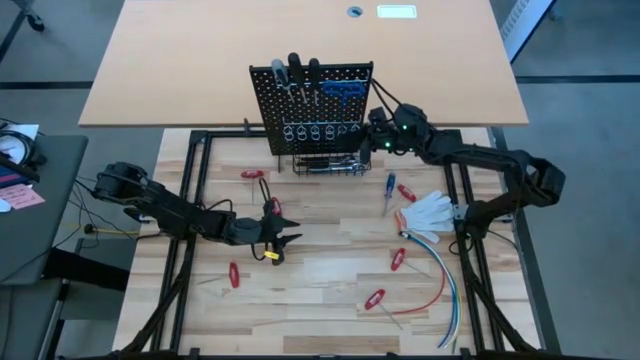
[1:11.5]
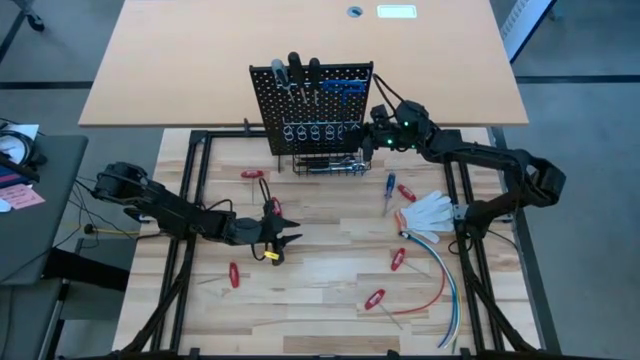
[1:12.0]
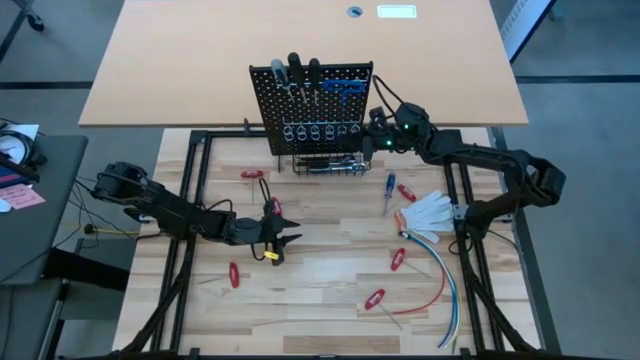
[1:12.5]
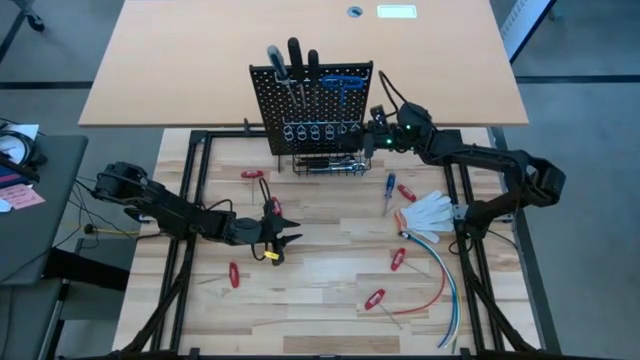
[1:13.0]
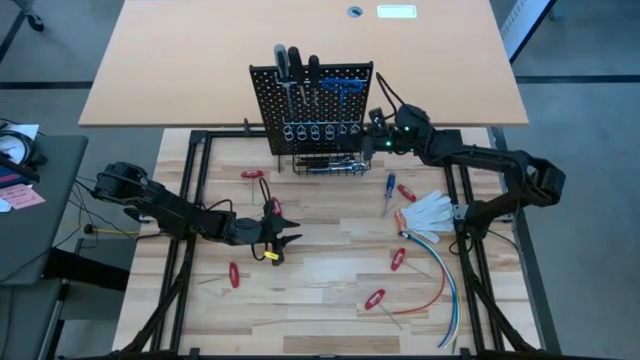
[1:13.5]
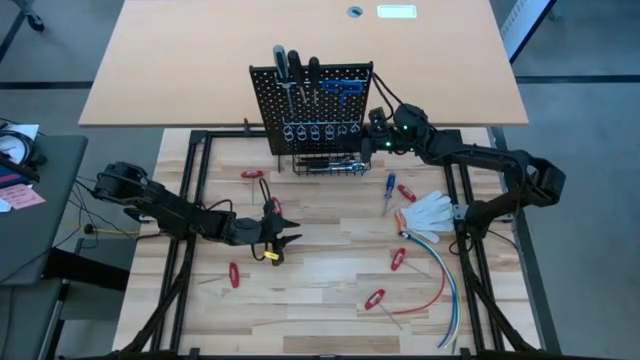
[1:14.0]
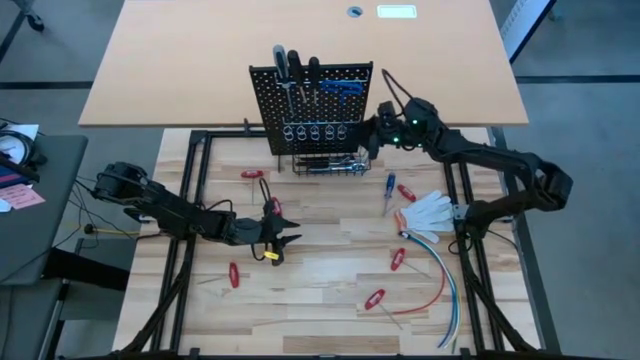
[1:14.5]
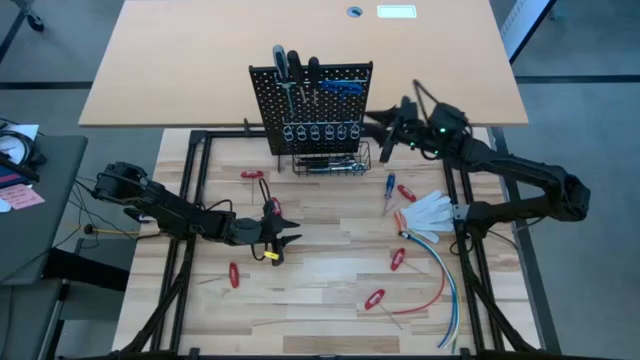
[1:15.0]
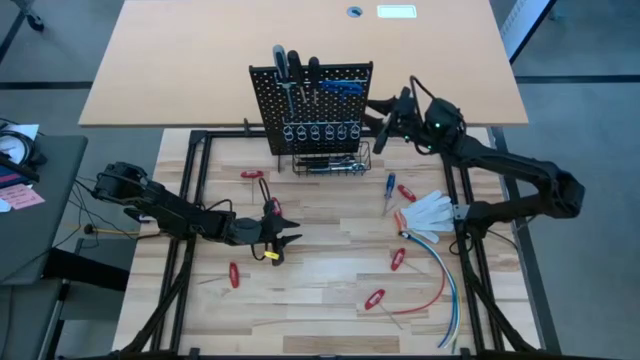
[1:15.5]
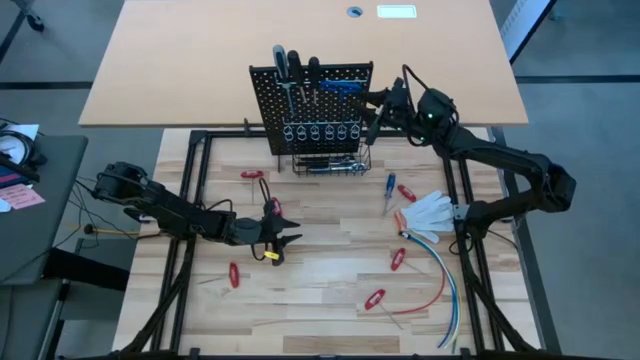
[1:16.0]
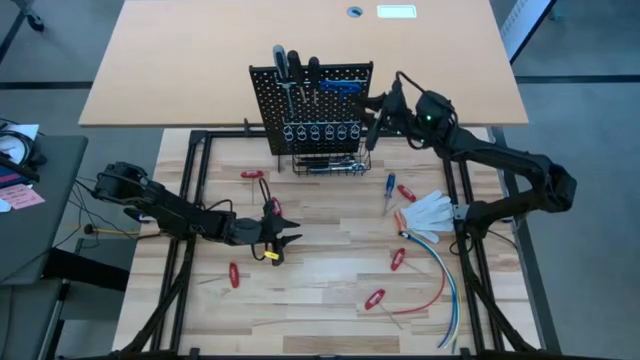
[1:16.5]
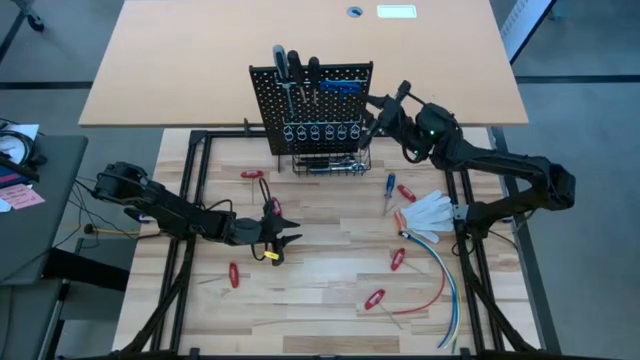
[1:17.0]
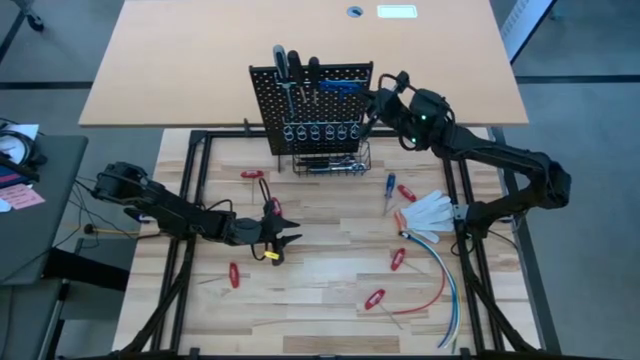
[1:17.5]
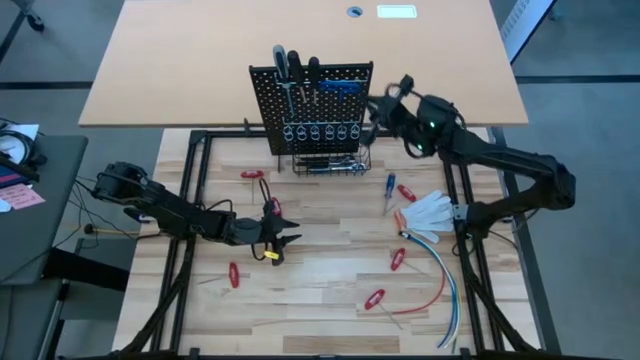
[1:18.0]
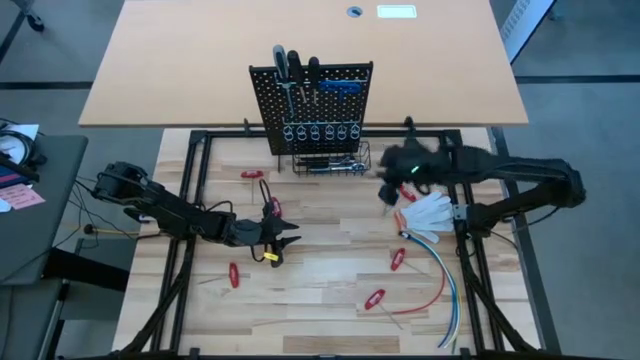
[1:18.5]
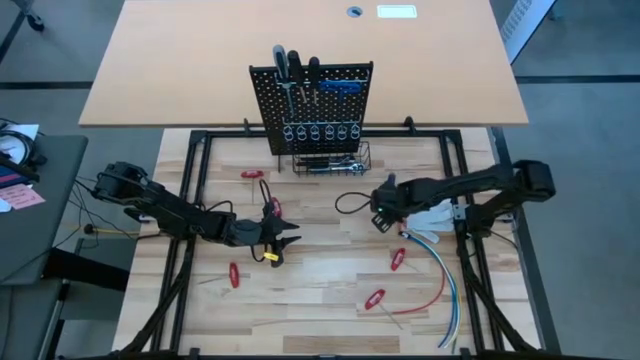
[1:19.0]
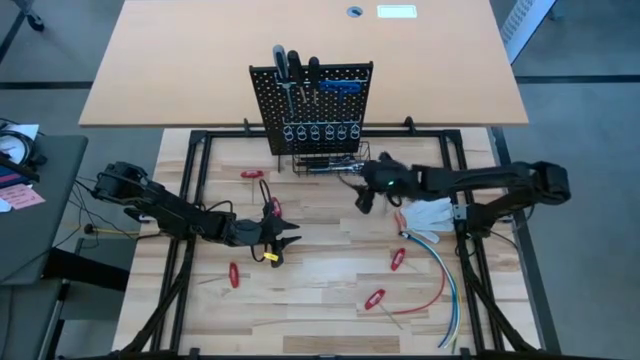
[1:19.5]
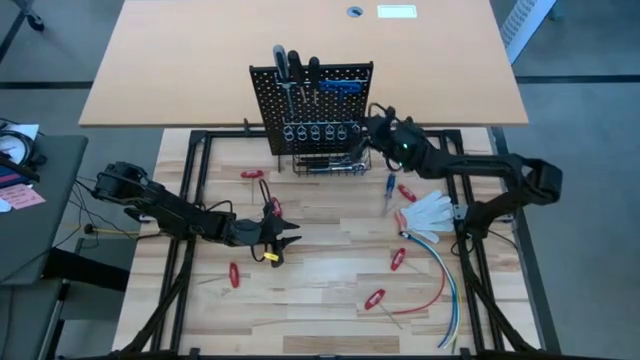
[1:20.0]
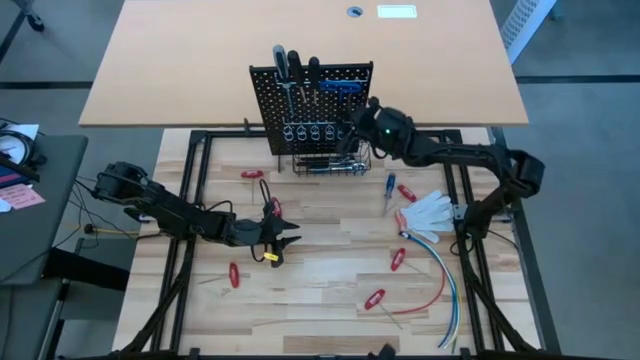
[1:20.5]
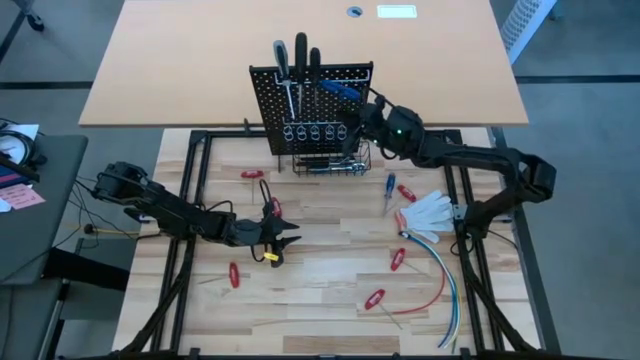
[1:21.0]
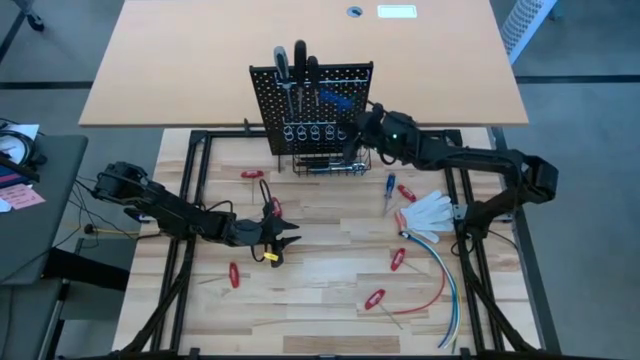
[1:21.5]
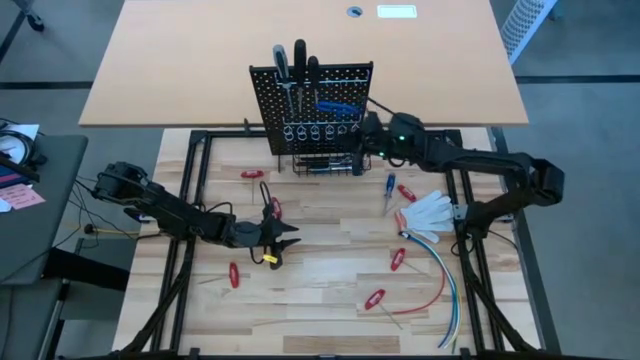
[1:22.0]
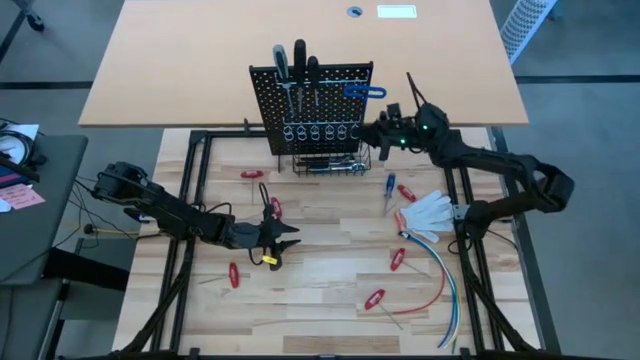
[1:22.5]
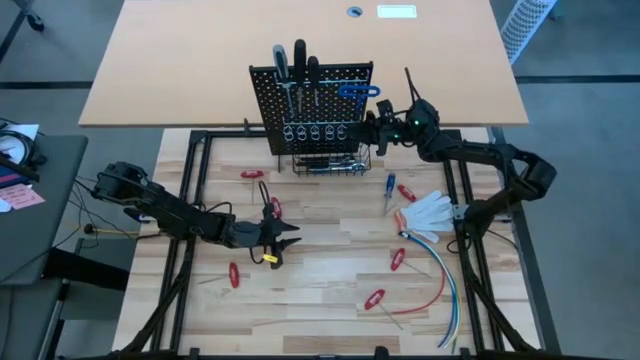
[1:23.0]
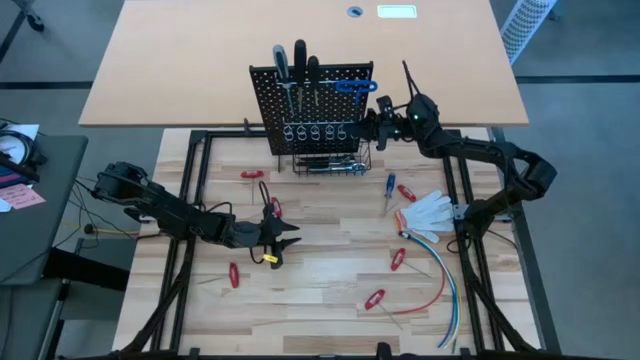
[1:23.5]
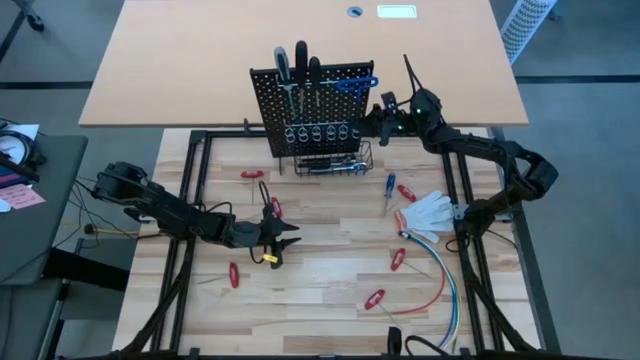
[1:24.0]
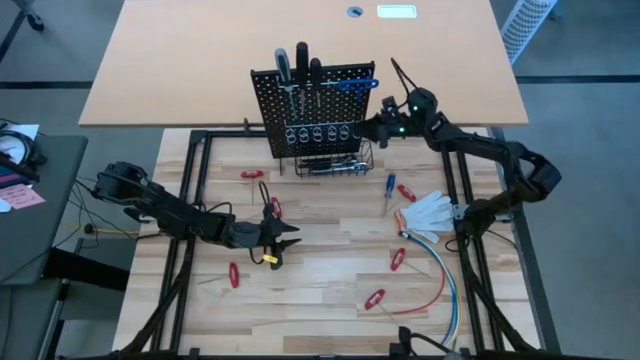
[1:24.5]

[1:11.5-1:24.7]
Task: Hang tools onto peg board
Hang the blue pick tool on the pegboard

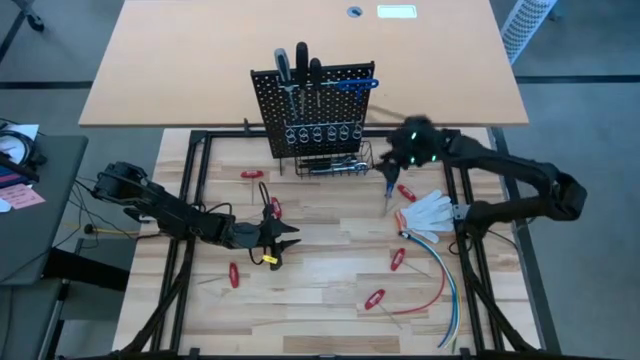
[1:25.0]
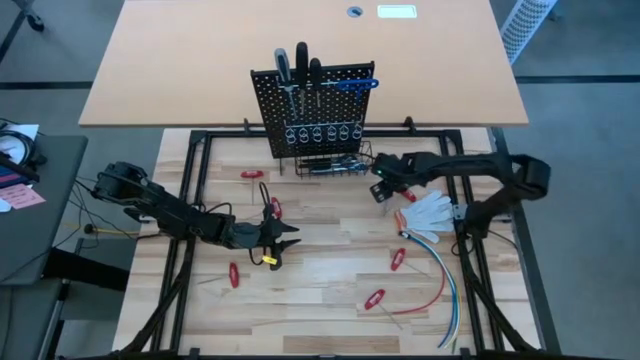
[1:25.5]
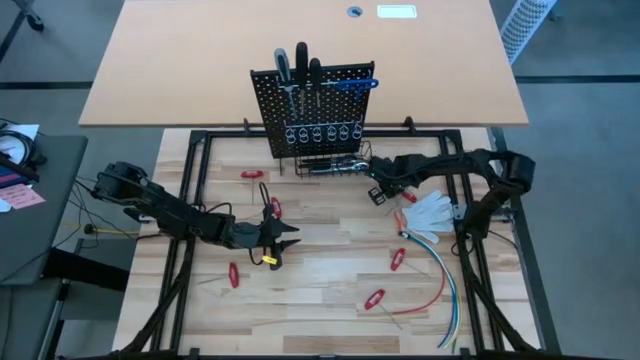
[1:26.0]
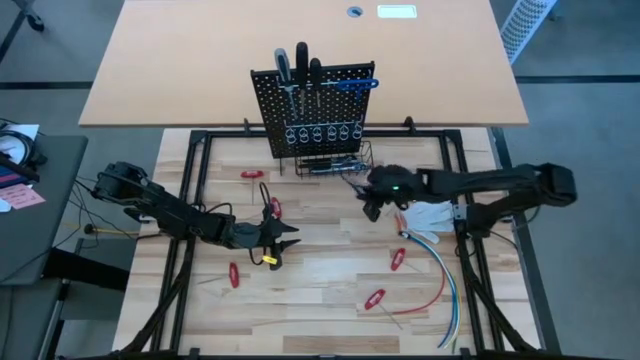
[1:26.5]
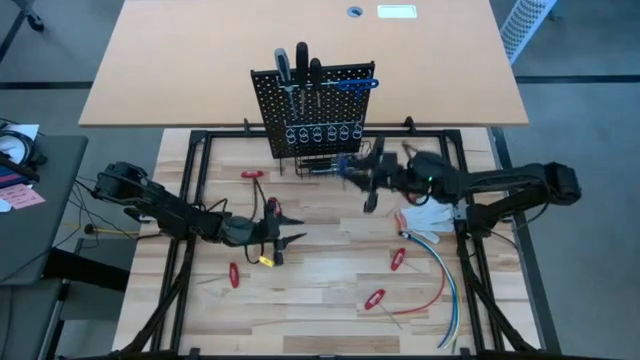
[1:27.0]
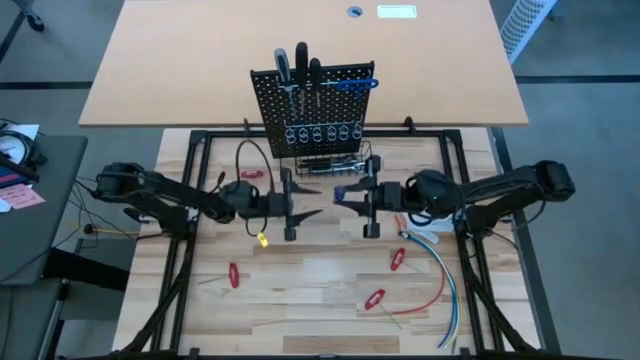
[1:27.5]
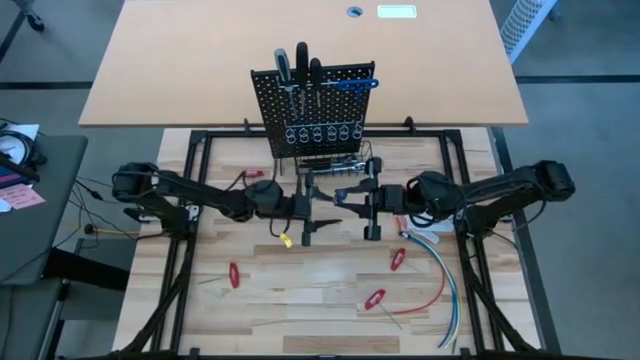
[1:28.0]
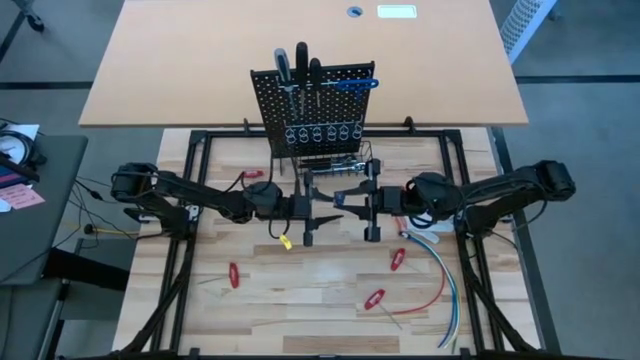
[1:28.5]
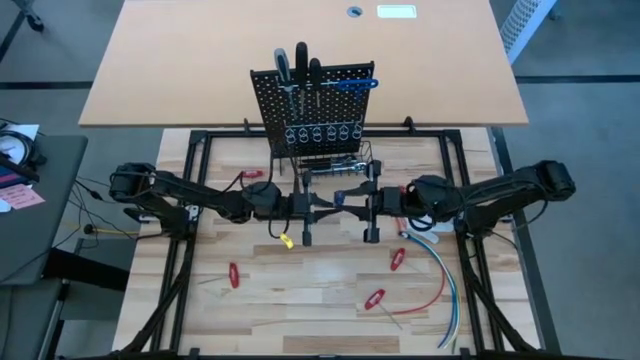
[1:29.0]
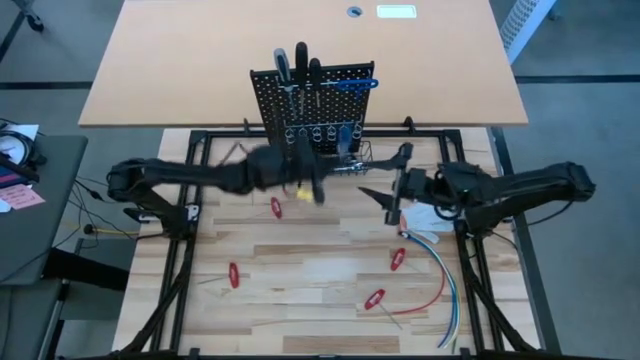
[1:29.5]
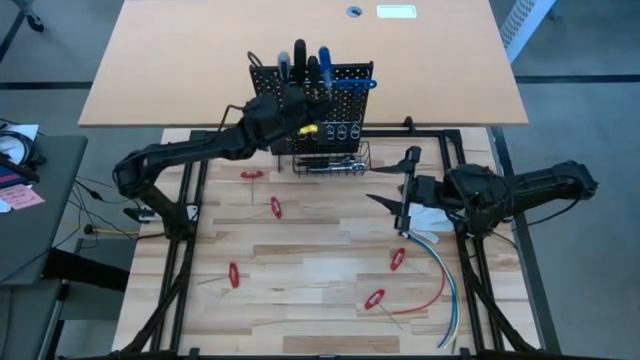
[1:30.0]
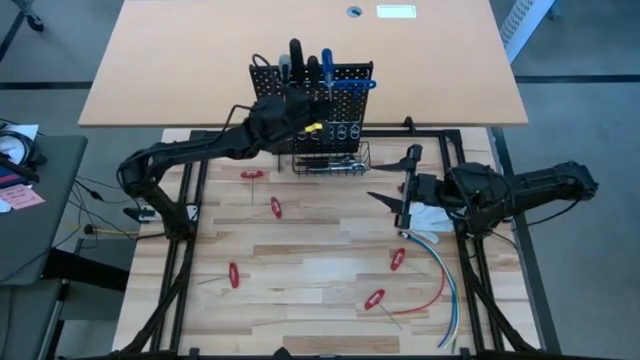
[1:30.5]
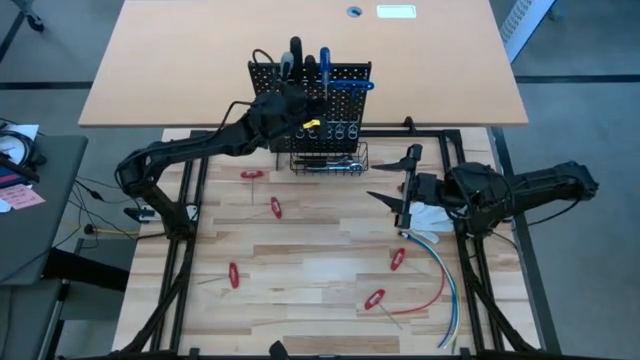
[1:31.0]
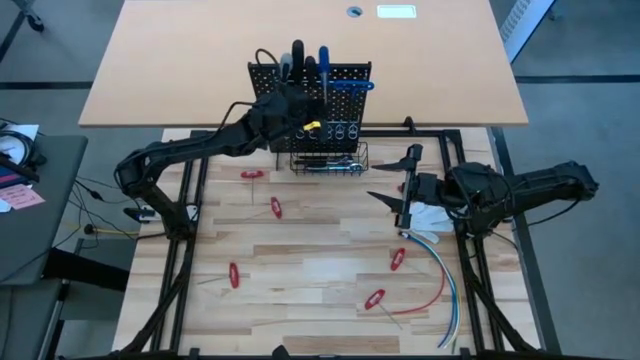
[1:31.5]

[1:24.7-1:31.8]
Hang the blue screwdriver on the pegboard

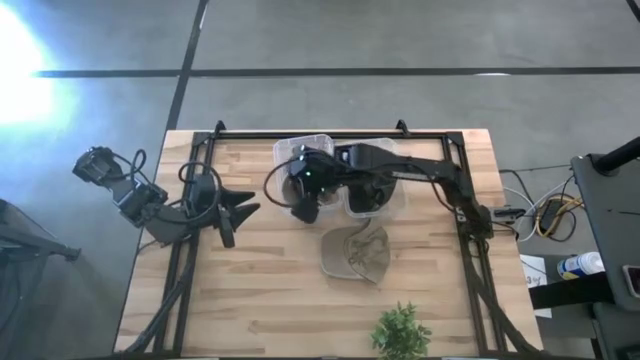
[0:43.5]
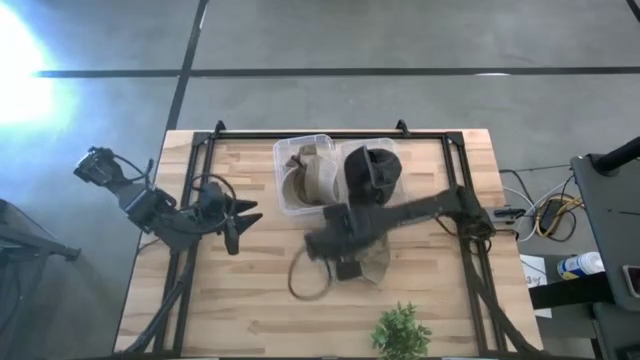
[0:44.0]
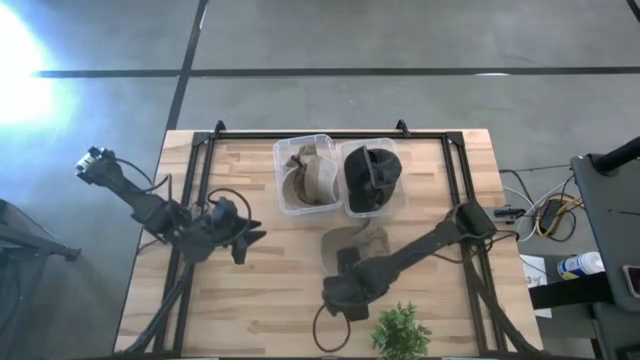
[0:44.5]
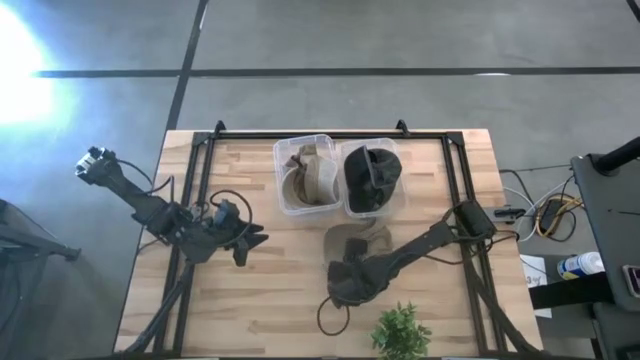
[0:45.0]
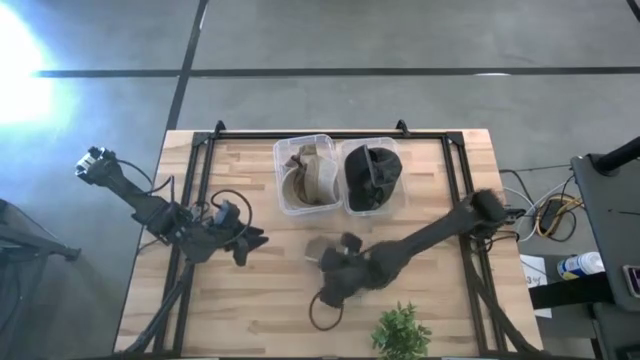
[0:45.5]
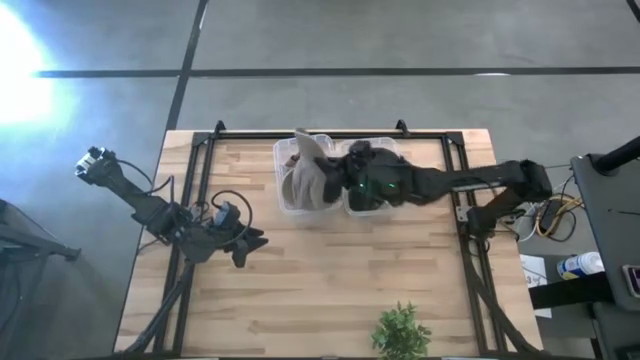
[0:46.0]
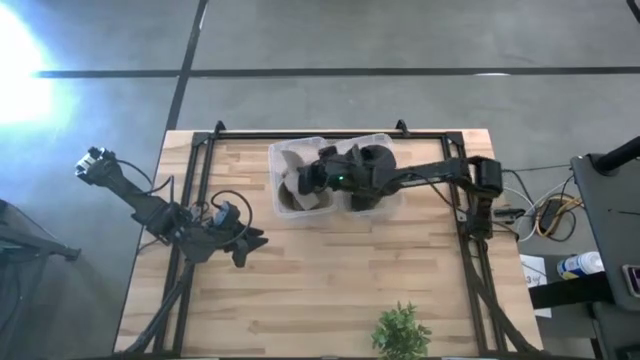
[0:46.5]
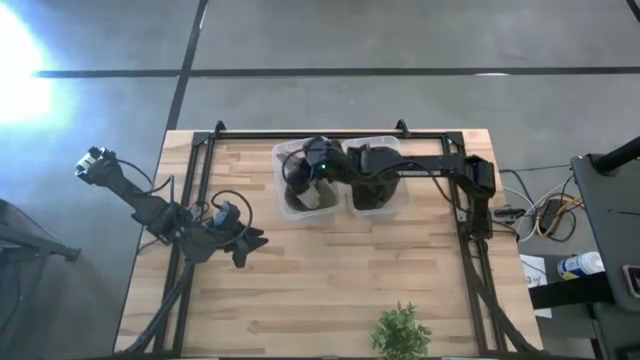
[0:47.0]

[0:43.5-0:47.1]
Task: Pick & Place hat
Put the brown cap into the left transparent bin
